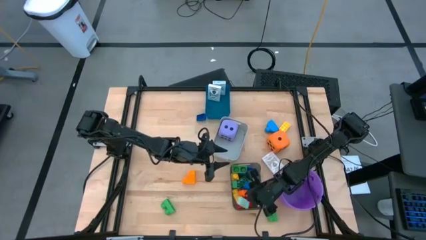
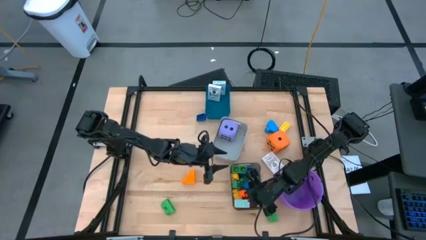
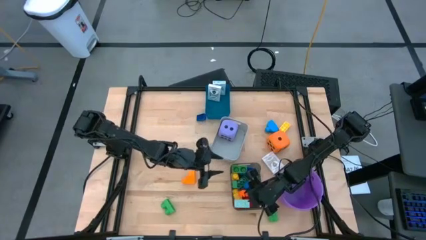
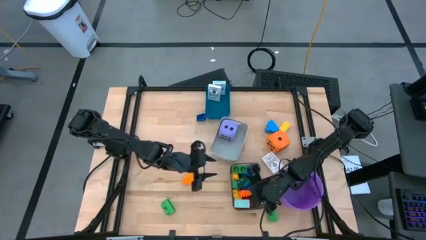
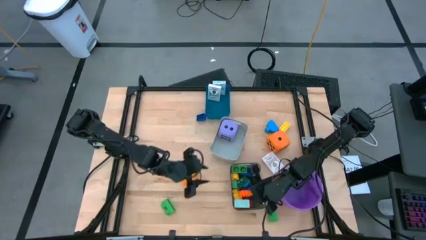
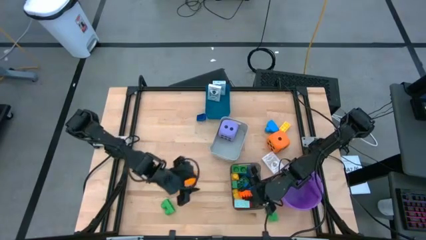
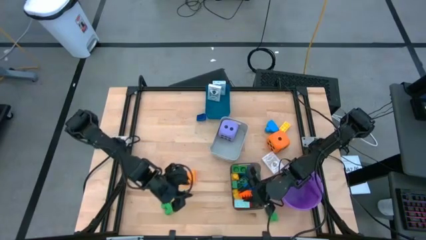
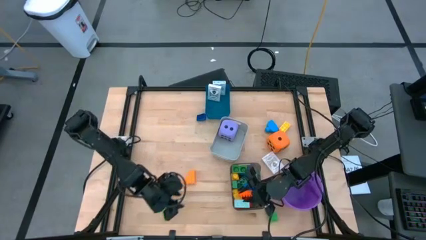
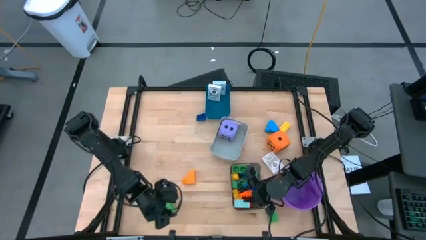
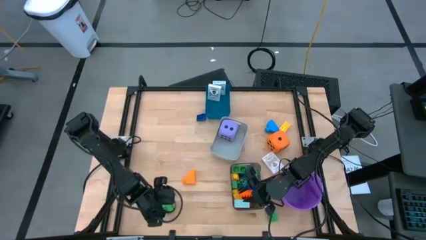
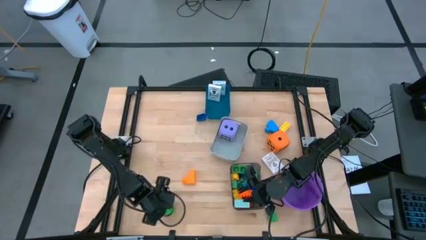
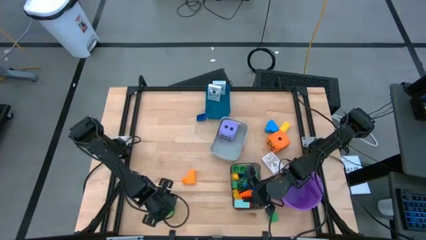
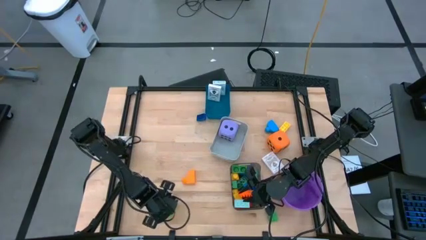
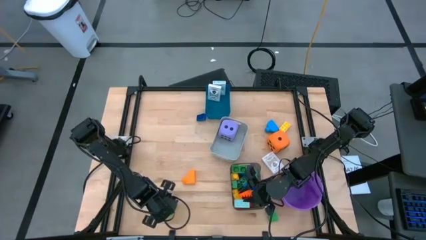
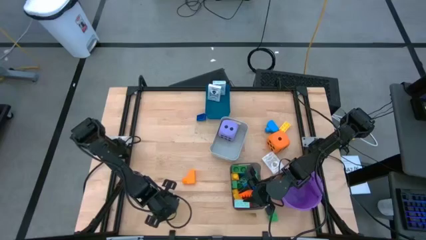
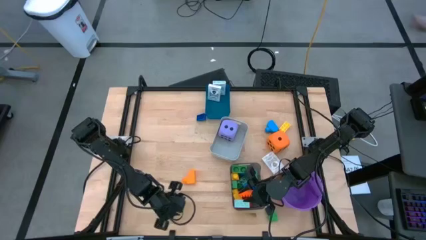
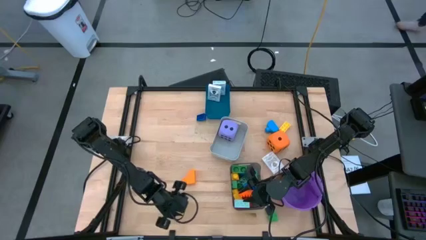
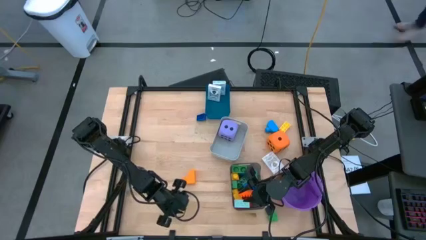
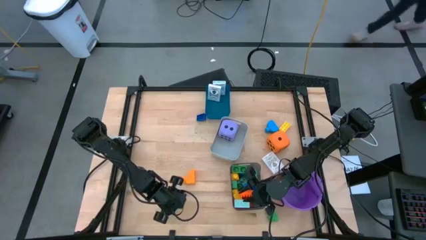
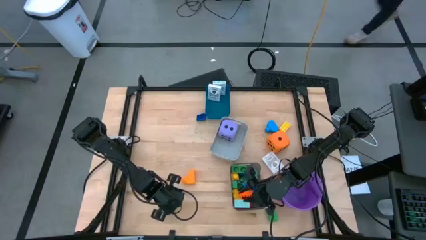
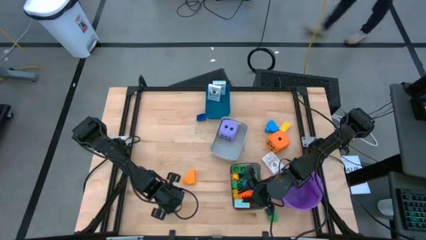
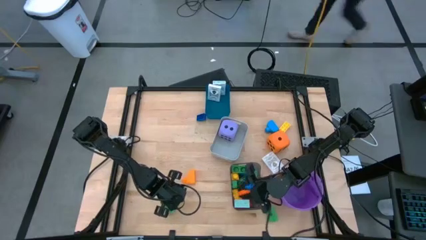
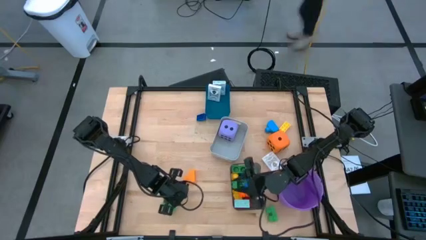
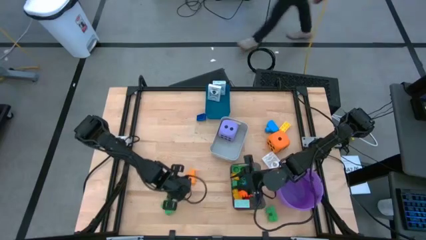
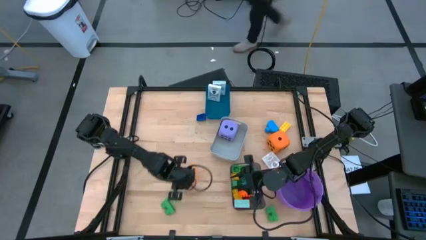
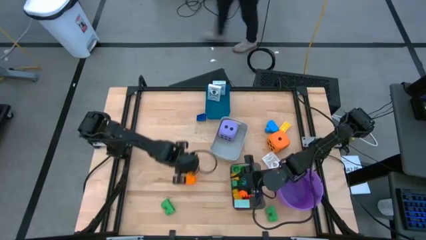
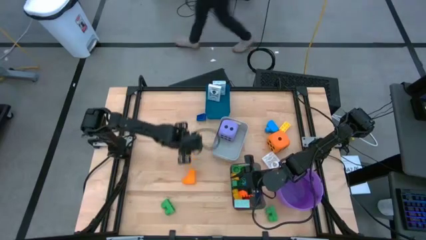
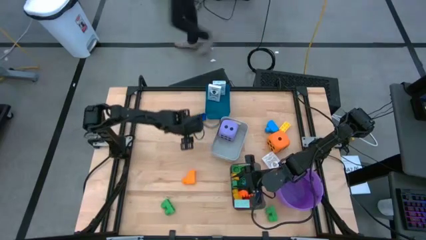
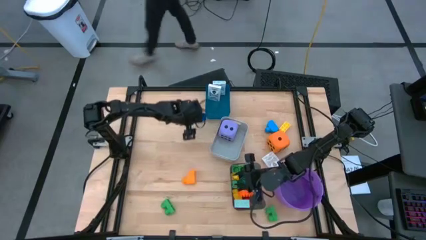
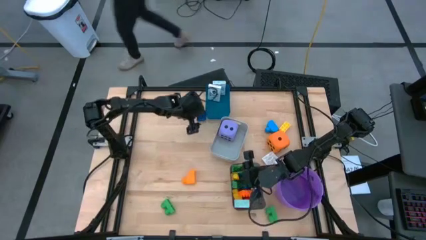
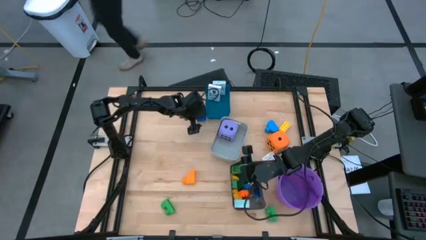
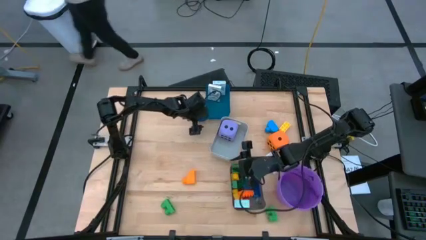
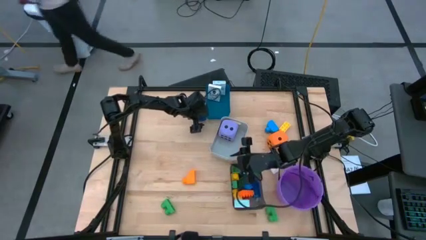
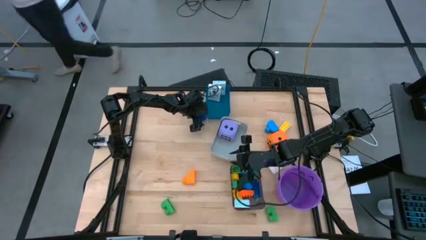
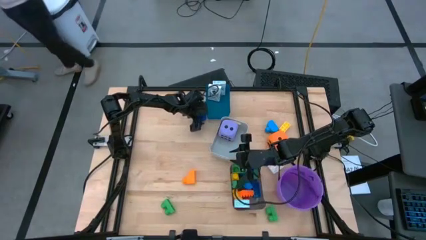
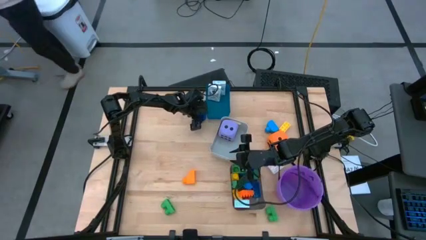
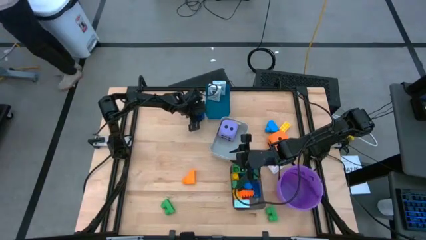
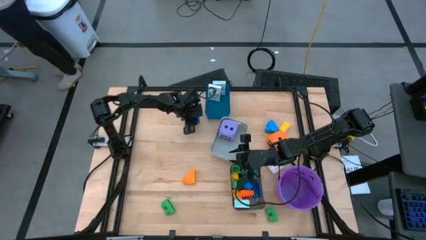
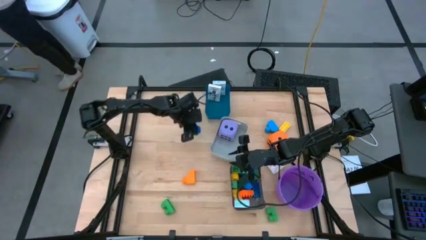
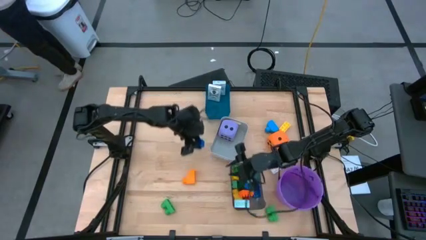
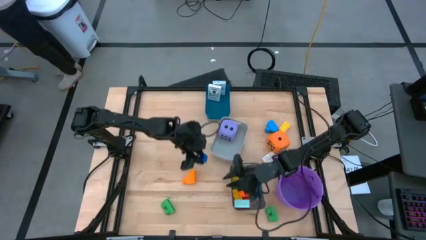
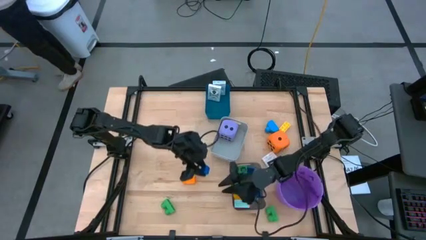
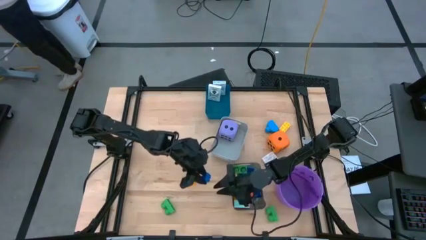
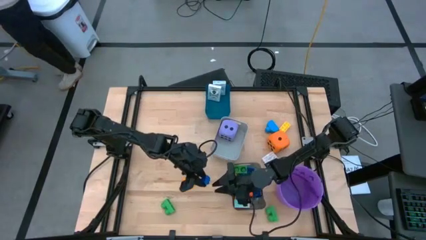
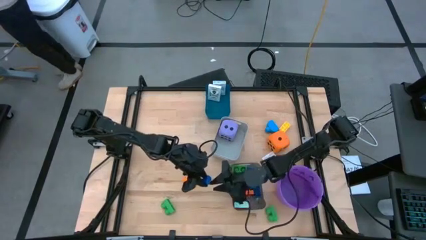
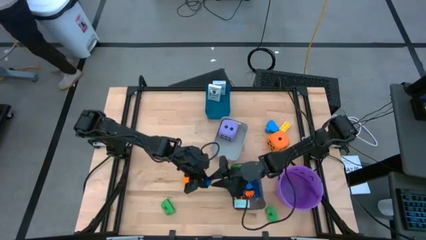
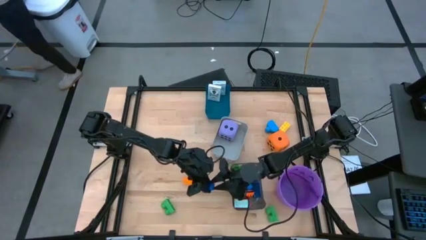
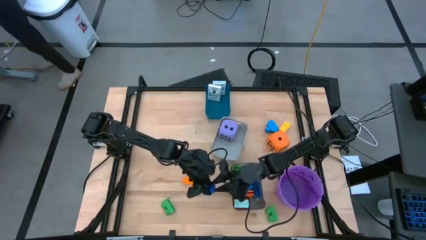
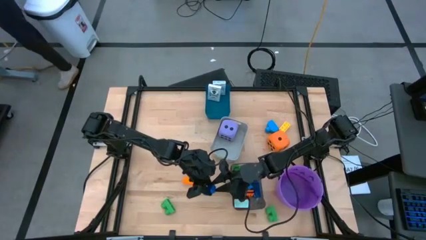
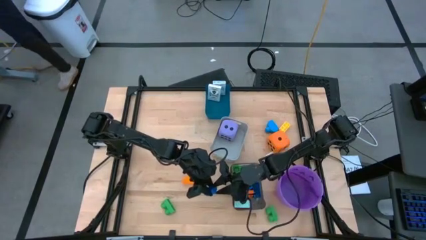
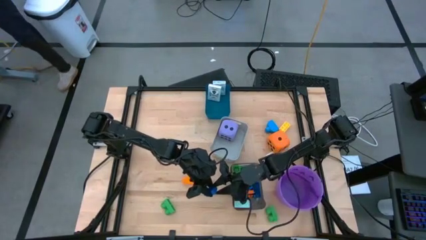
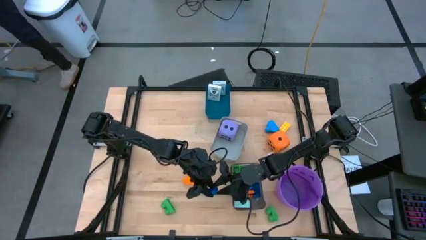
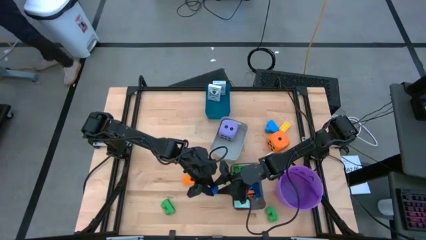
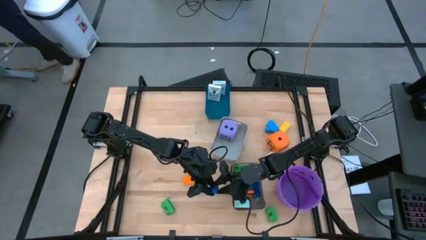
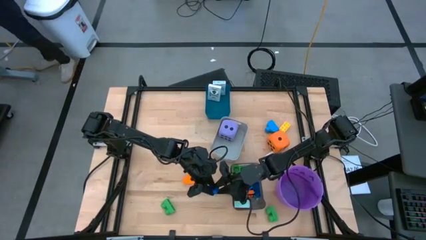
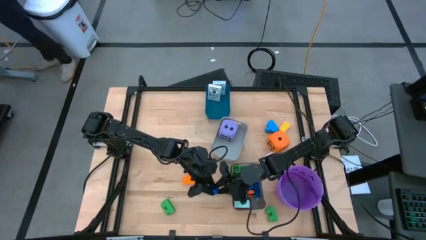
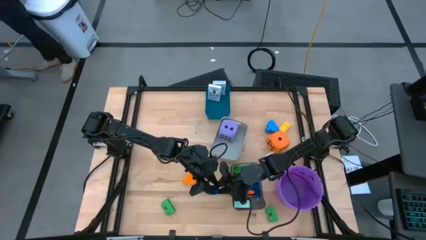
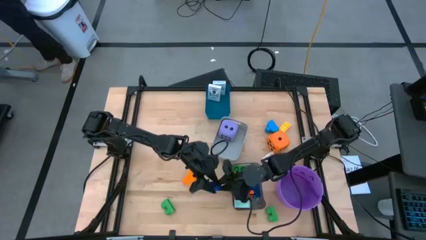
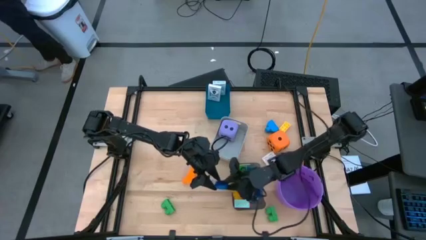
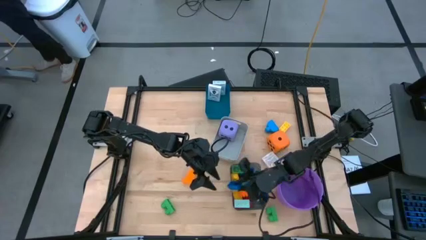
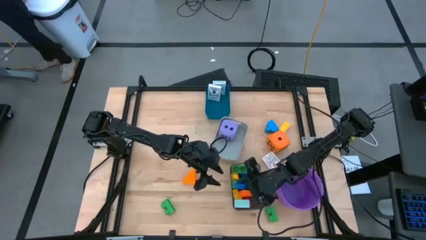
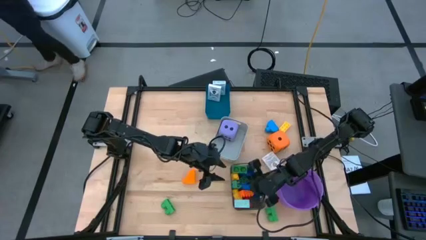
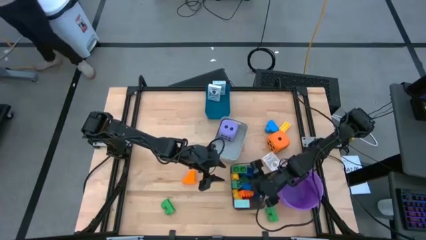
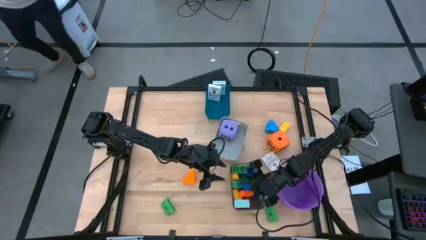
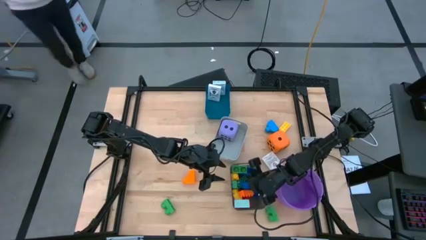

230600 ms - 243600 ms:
Task: Pick & Place Toys
Put the blue game piece into the black bin

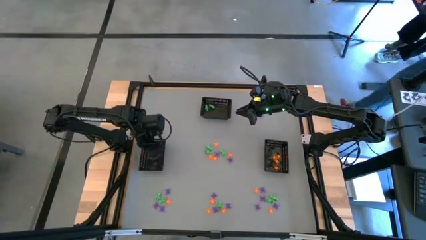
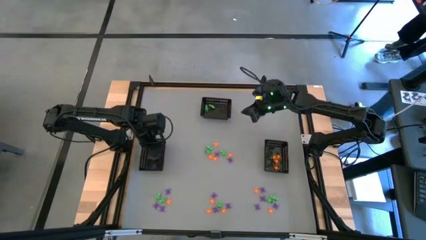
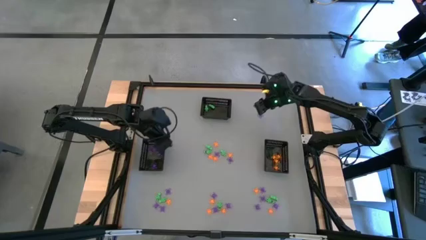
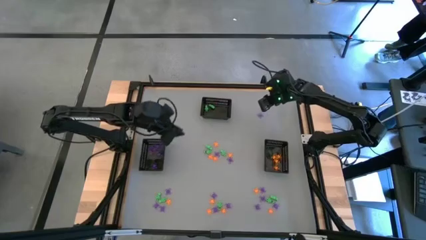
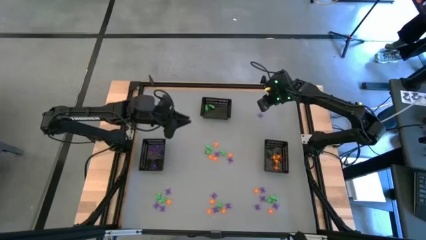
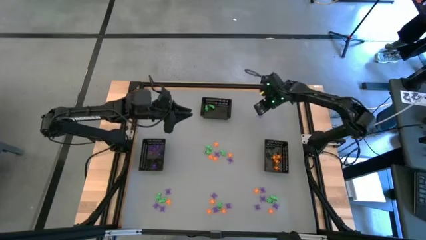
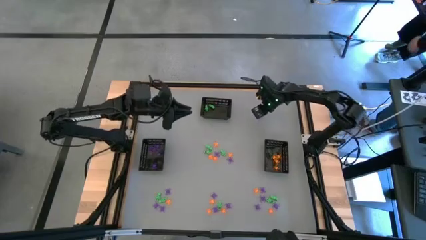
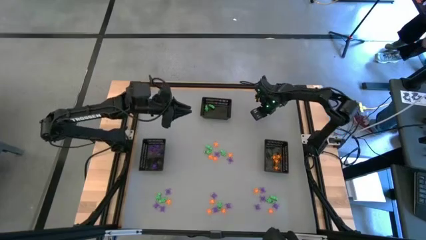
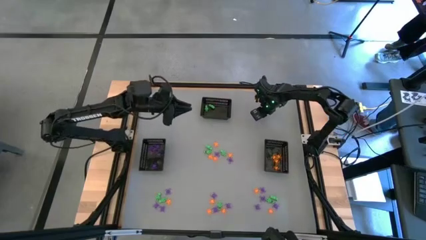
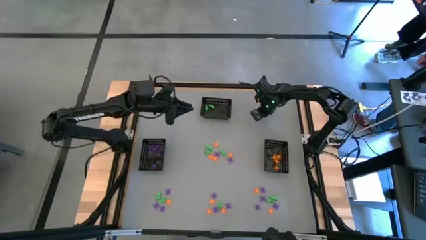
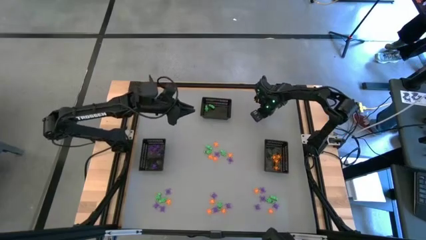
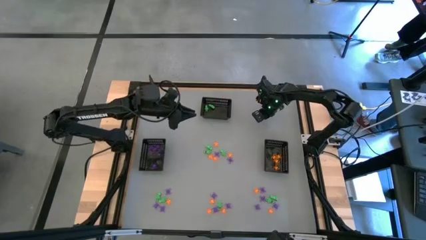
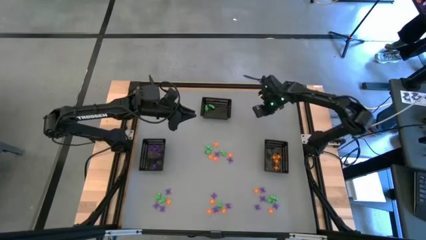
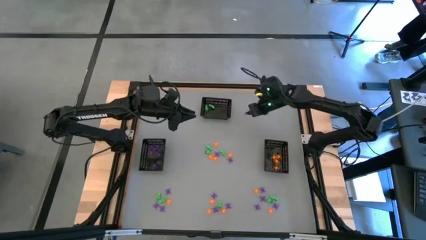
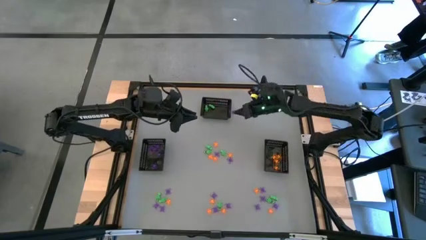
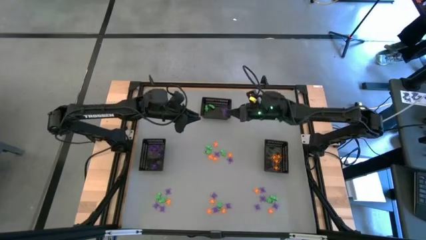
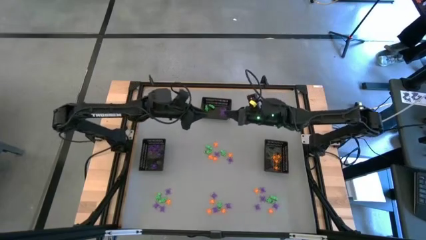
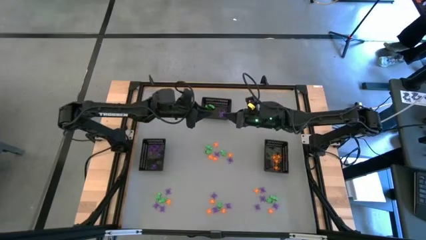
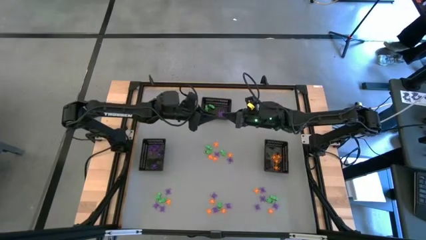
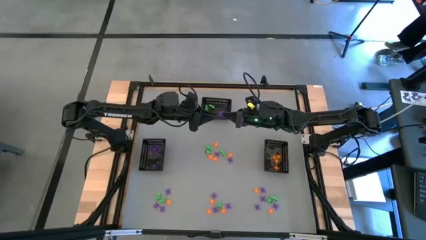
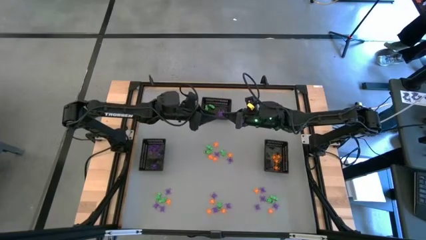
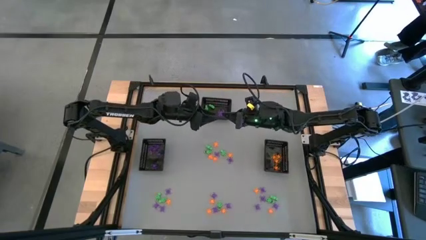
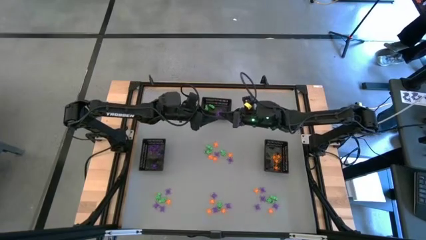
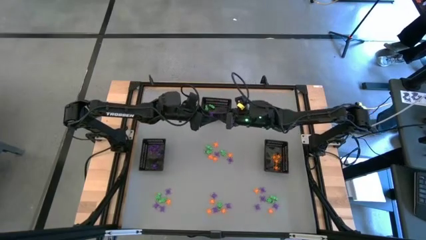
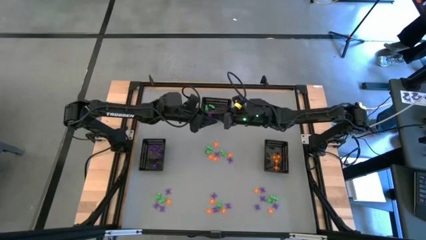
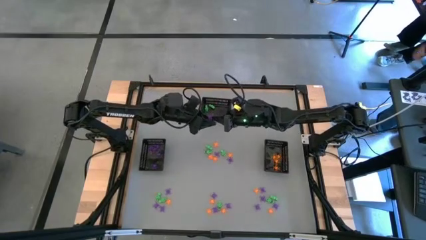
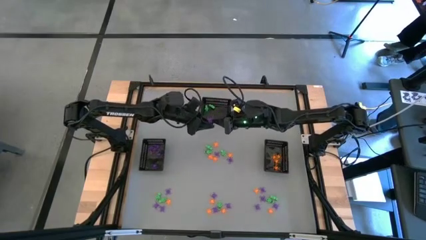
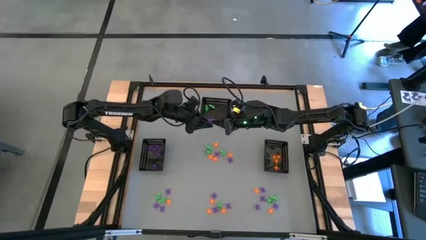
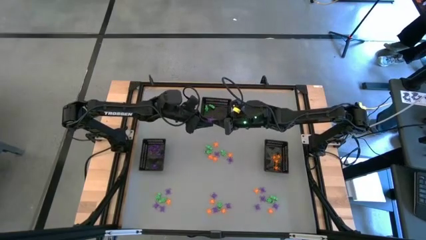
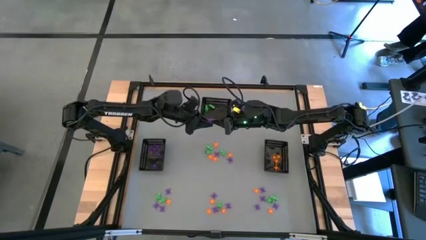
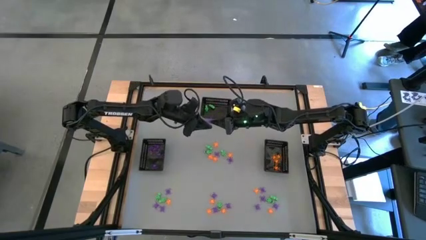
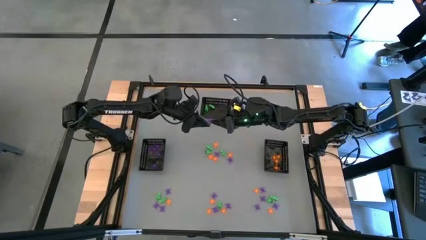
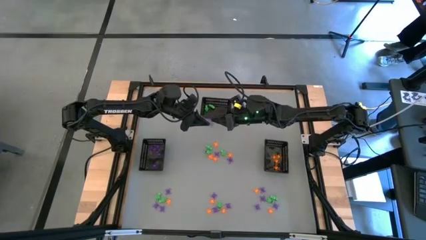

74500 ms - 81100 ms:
Task: Sort Halloween decoration
Put the violet spider toy into the left bin
